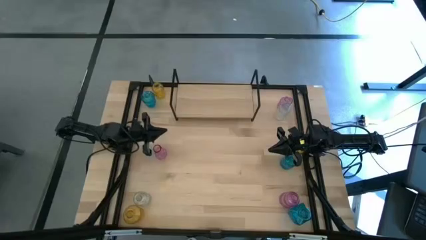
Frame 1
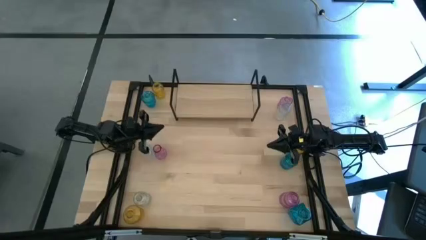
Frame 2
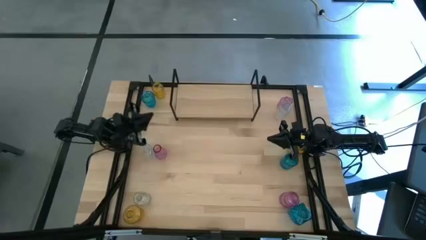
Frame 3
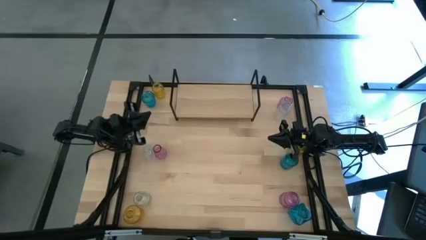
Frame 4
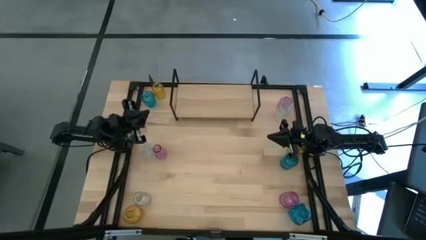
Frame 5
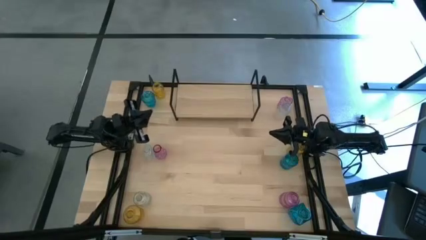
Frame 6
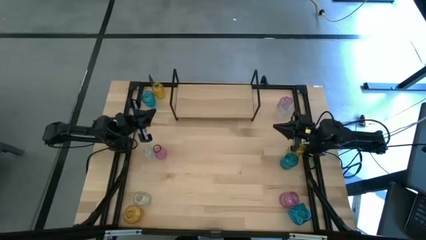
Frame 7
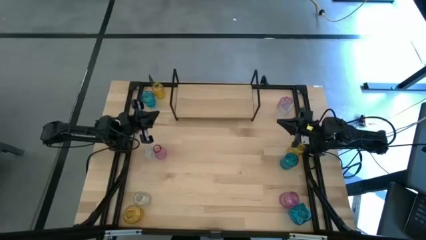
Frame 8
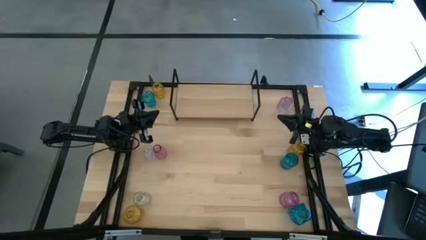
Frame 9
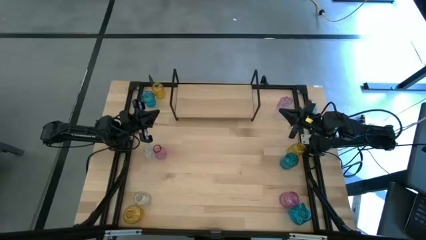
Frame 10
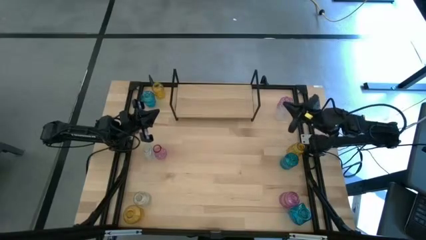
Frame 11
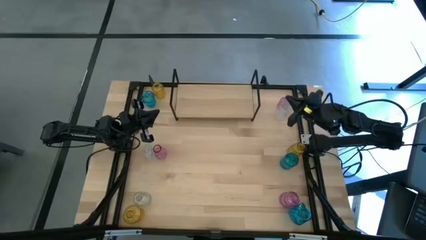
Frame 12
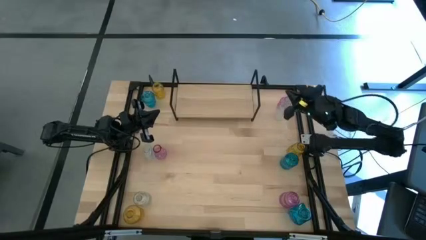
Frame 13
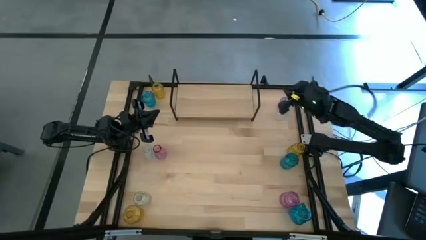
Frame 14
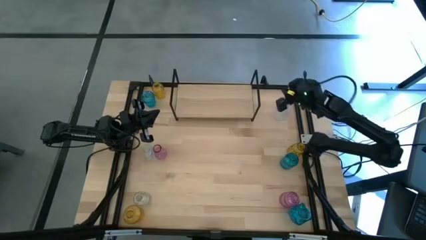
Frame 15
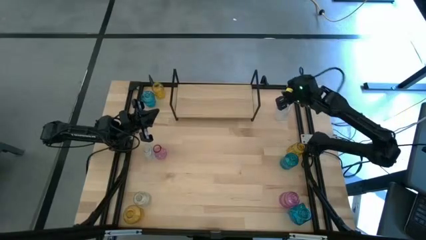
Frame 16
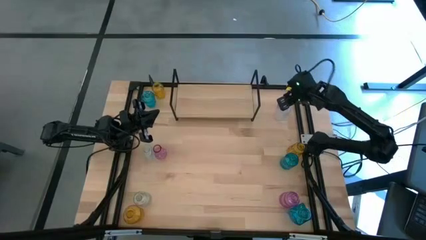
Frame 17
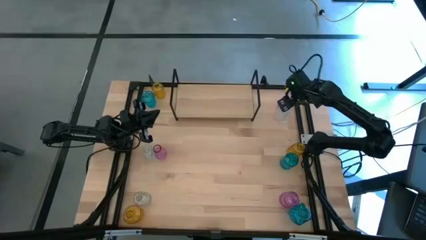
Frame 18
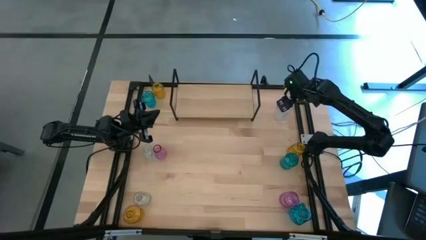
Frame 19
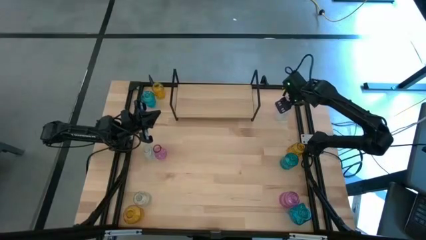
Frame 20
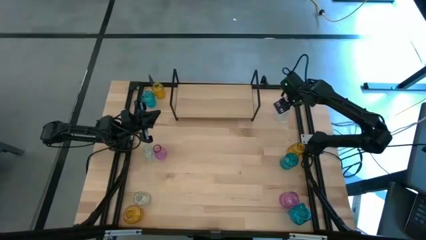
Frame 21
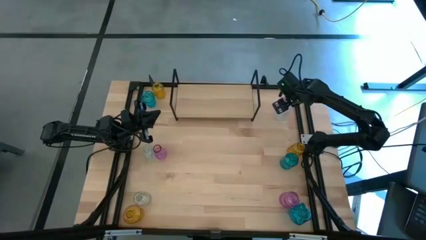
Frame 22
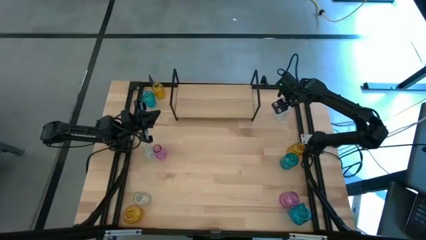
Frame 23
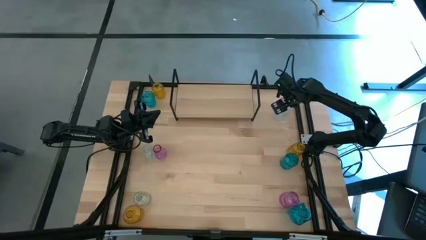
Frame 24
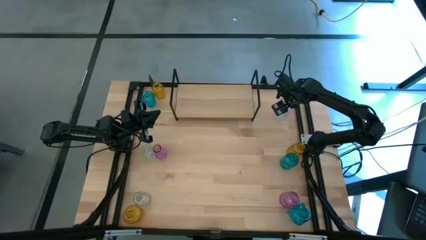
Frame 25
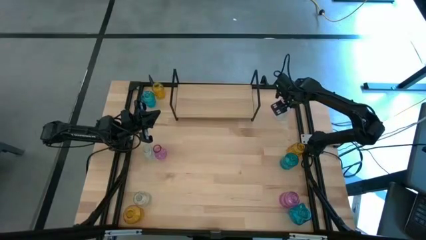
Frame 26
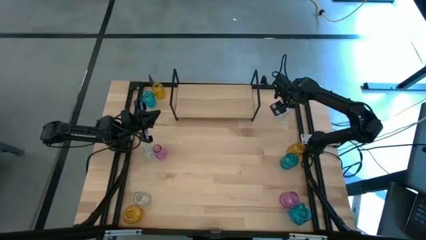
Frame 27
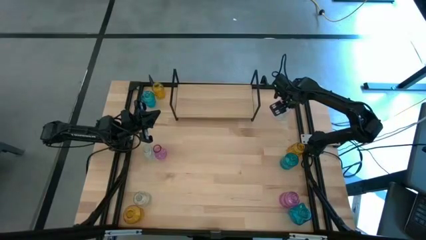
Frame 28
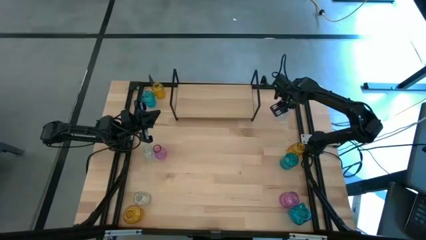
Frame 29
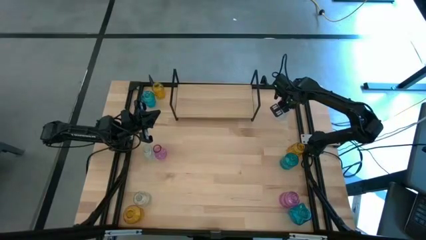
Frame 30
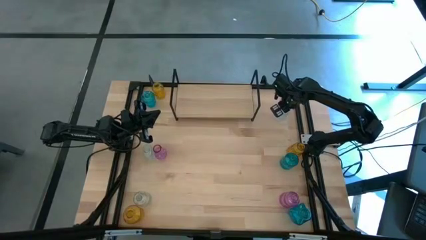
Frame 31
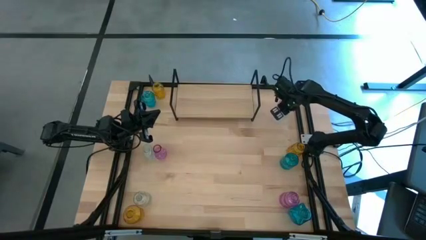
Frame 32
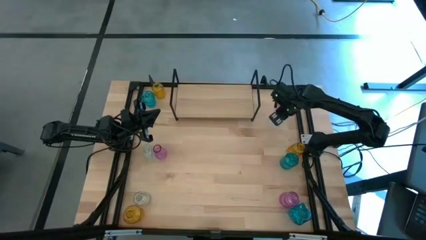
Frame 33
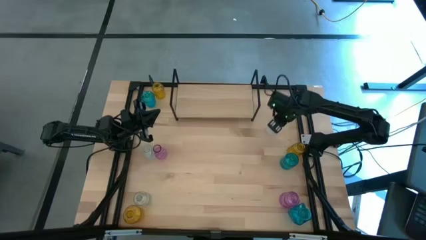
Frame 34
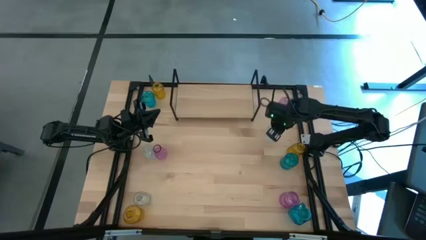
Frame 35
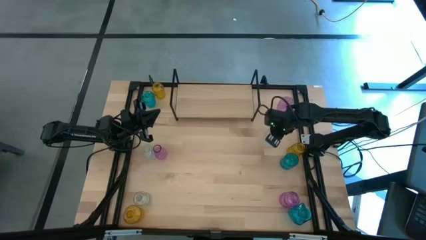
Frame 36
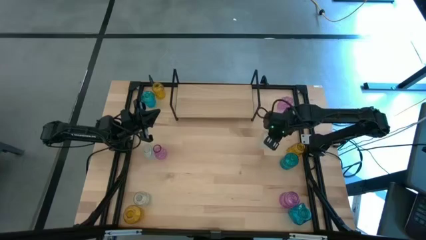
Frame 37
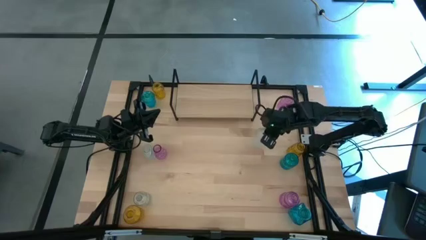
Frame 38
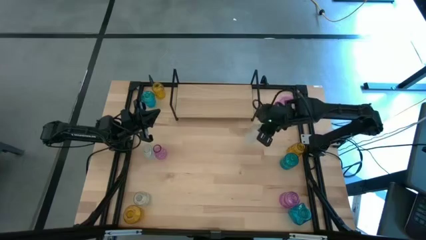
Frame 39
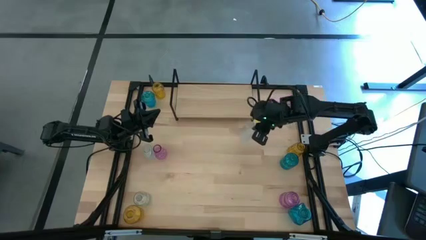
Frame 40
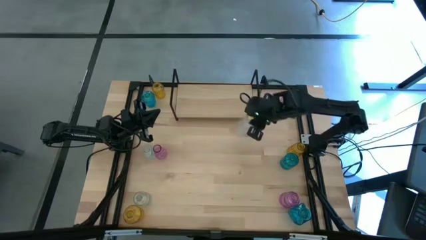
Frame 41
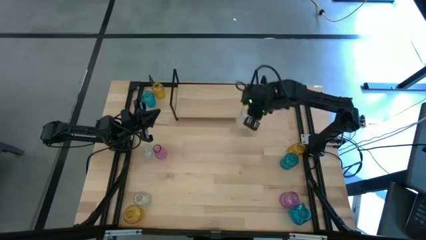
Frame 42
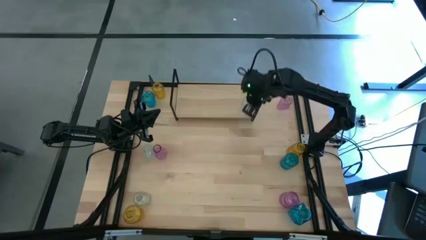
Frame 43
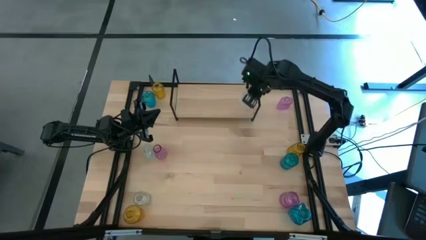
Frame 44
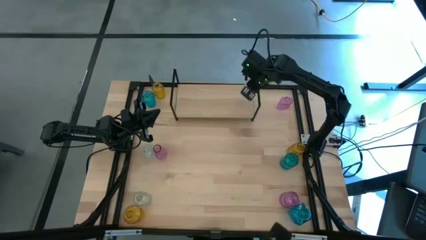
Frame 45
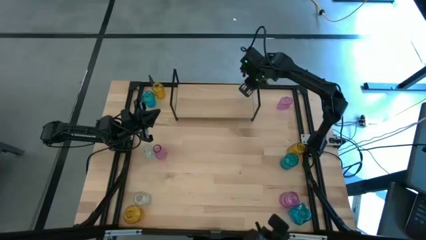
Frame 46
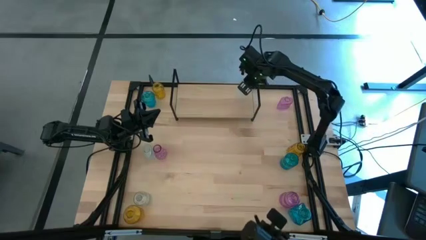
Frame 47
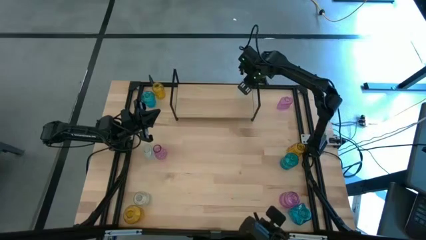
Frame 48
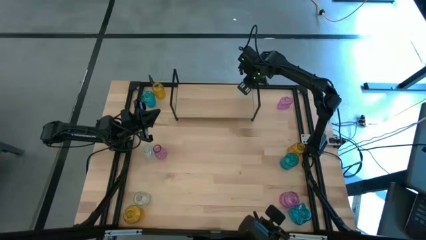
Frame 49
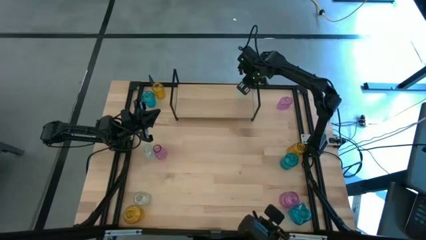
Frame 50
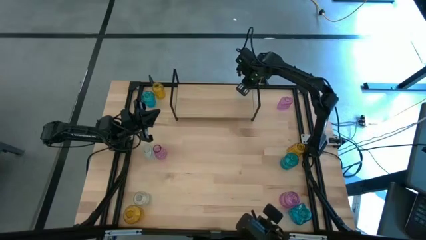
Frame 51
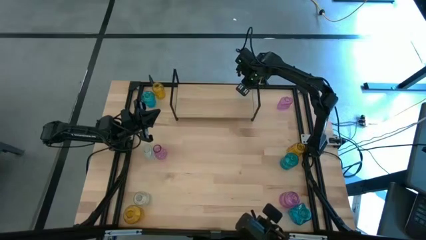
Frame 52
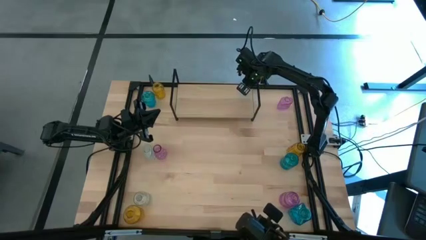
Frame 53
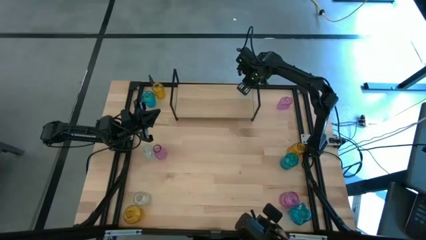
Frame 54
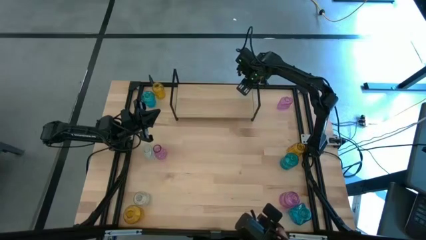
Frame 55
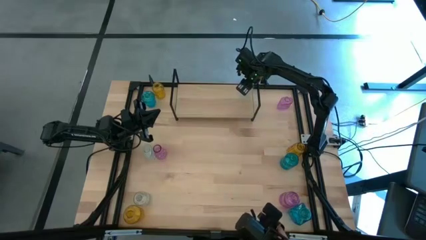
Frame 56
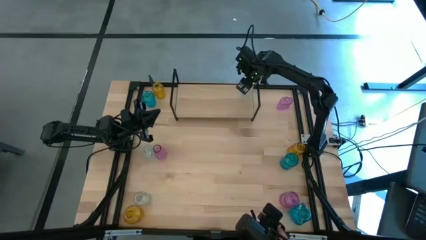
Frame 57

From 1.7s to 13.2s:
Task: sort vases onto shelf
Put the top right transparent vase on the shelf

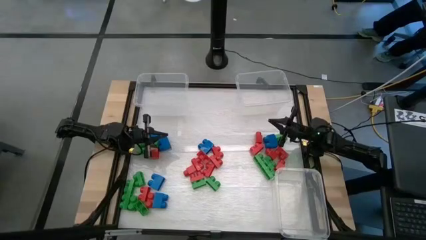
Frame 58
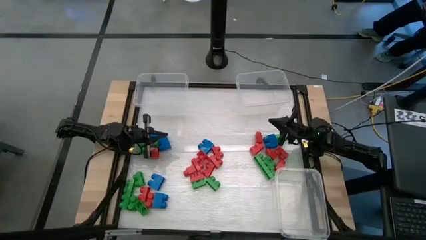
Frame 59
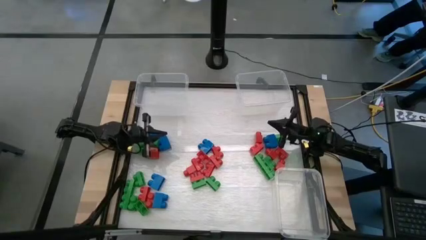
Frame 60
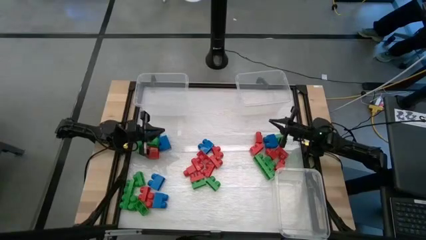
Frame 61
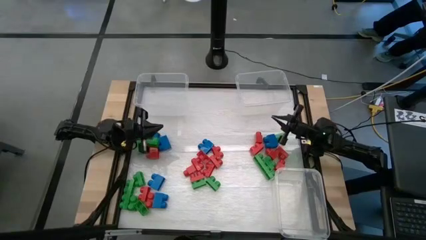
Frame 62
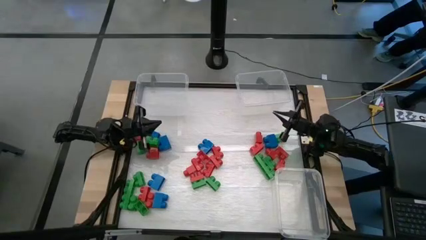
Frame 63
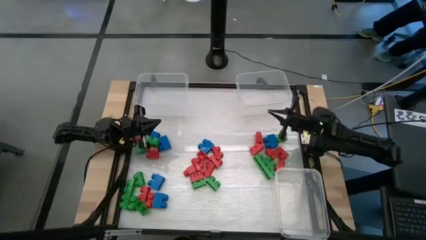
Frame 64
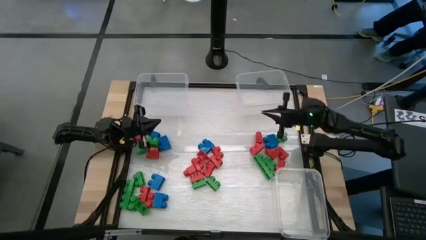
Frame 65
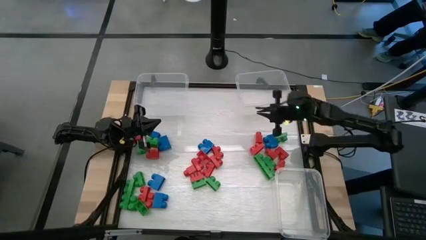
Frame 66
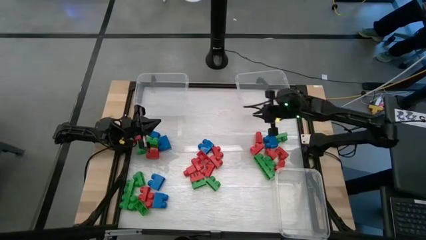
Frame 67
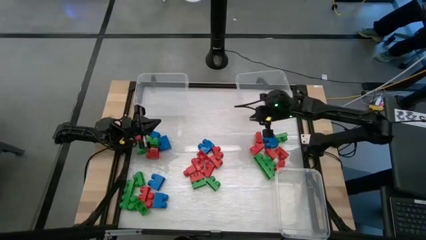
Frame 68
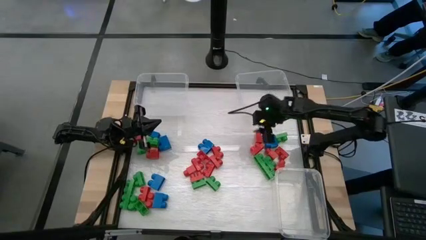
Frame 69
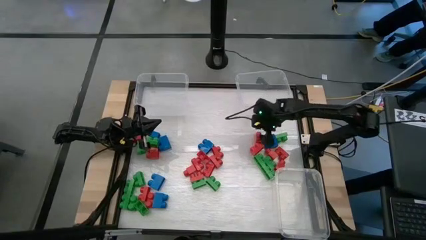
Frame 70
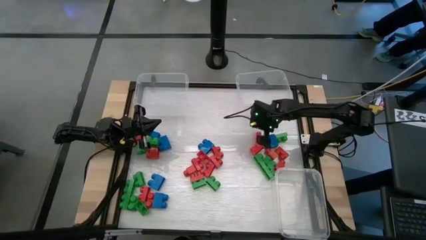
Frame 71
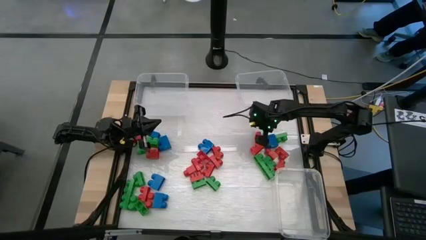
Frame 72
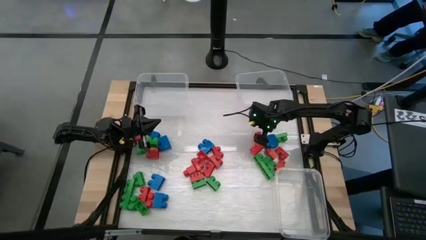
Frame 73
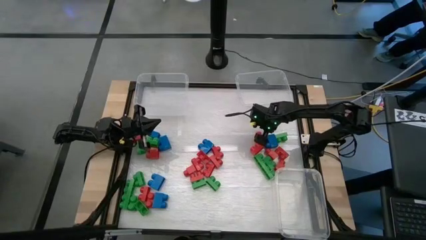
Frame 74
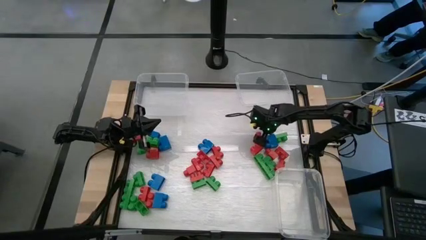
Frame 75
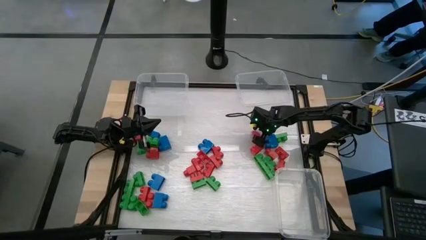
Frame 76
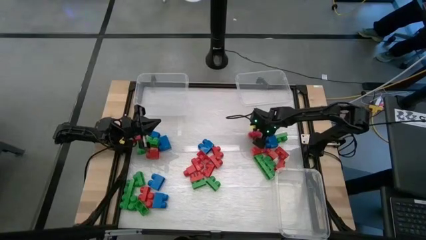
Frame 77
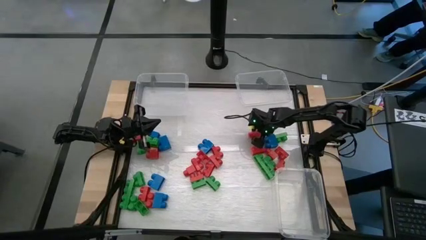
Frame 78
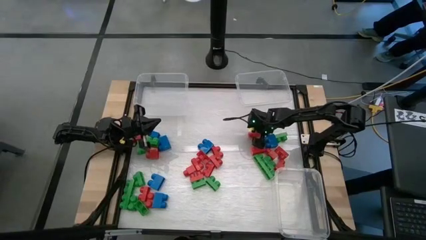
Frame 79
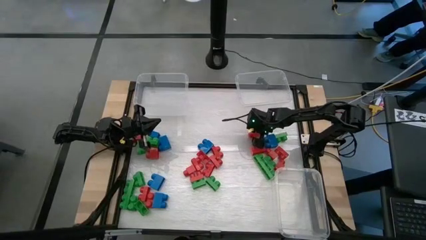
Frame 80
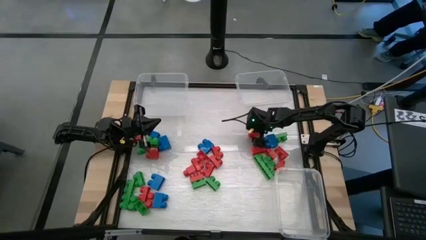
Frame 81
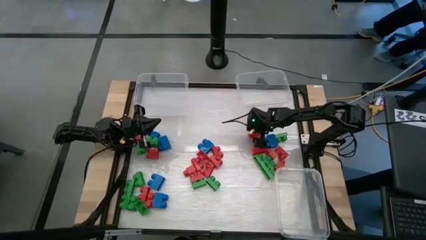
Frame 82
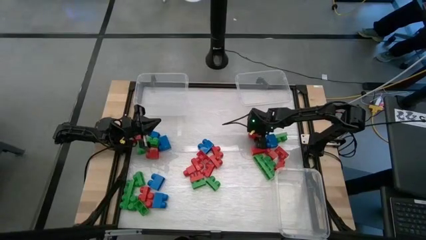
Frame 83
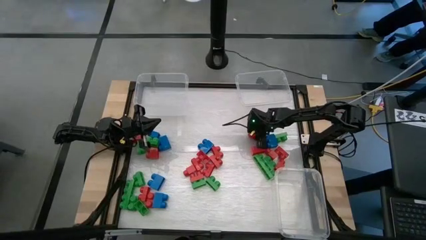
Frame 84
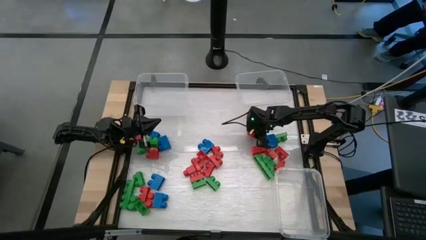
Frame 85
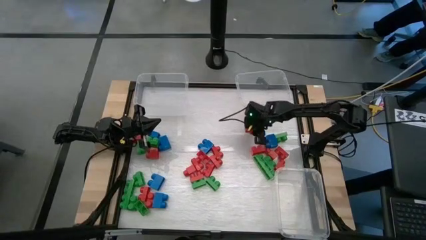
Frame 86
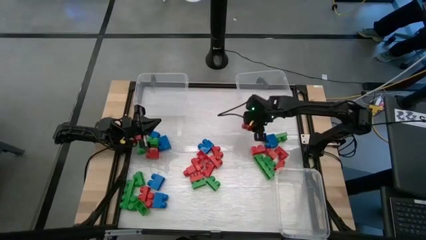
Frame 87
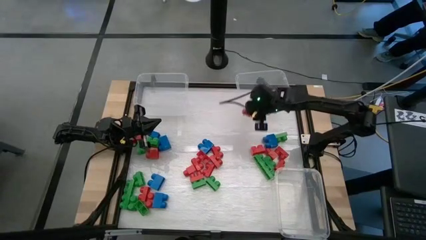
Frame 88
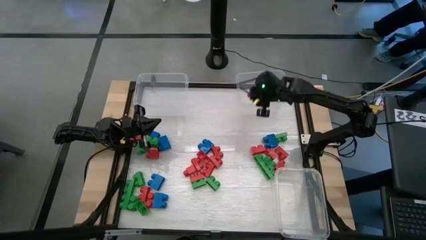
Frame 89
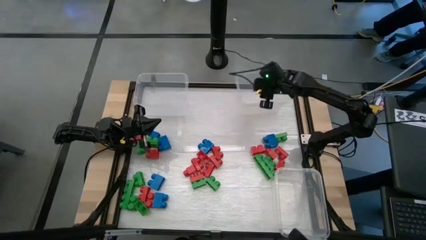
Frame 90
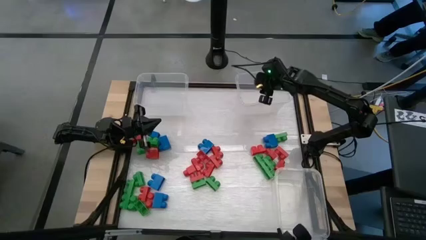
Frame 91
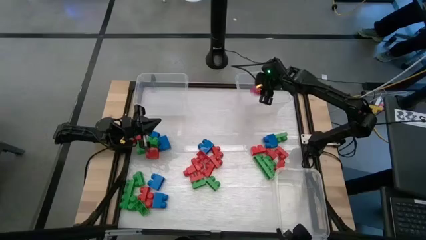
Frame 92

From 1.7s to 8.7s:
Task: Sort blocks
Put the red game piece into the top right transparent bin
